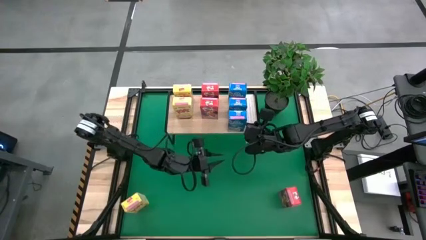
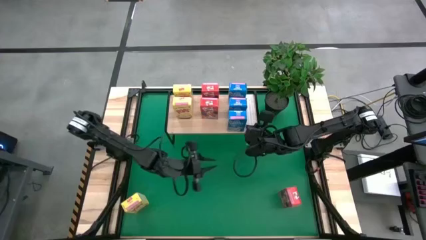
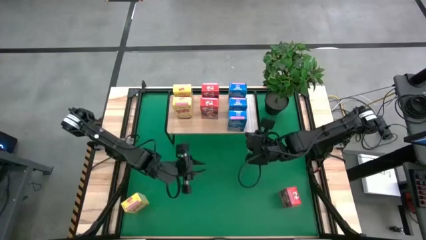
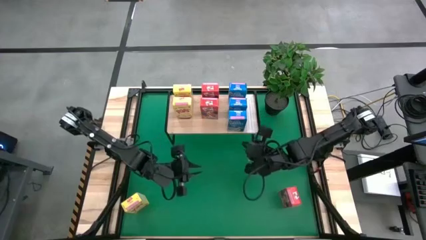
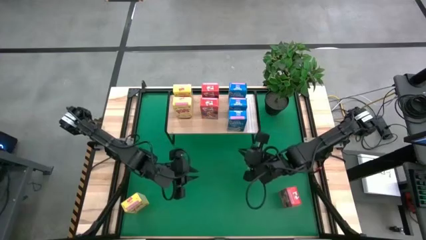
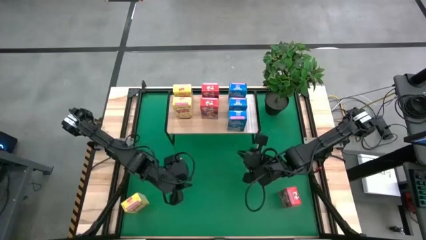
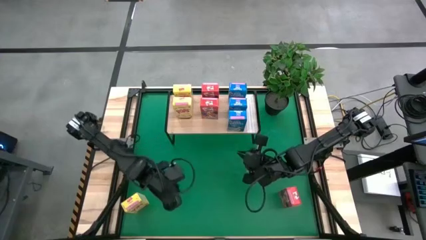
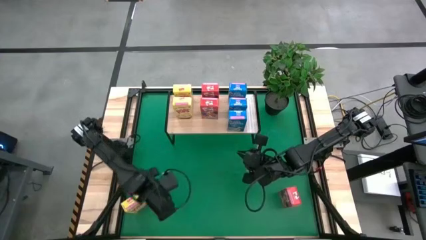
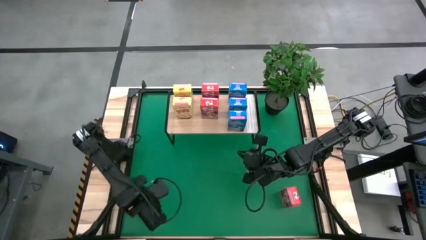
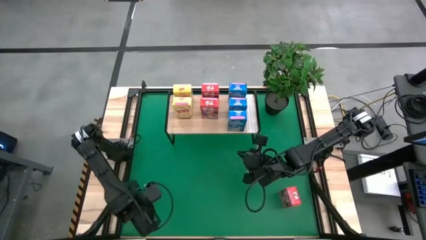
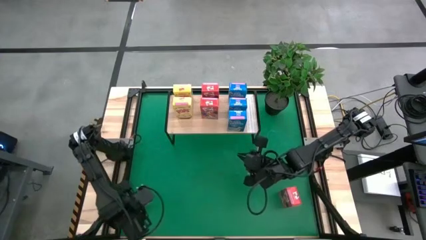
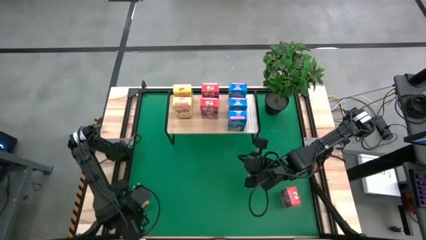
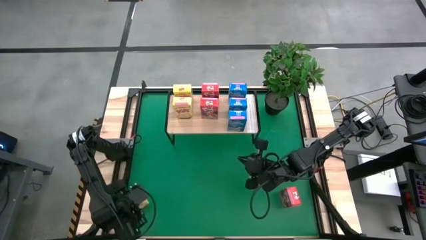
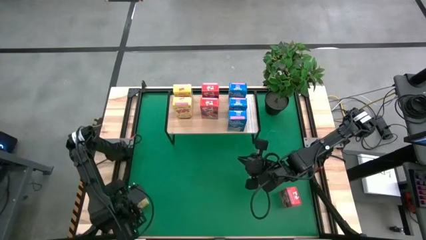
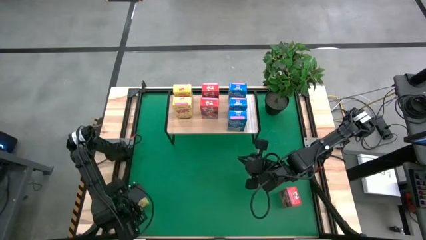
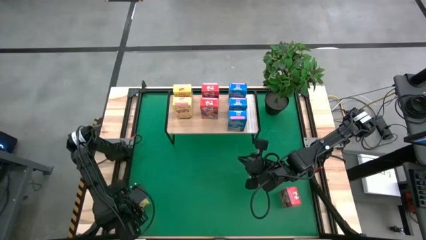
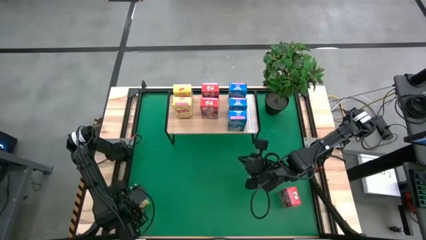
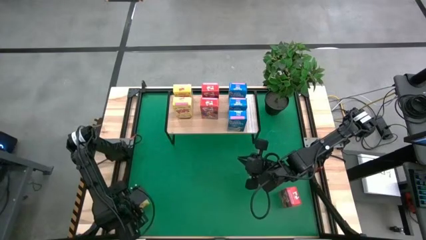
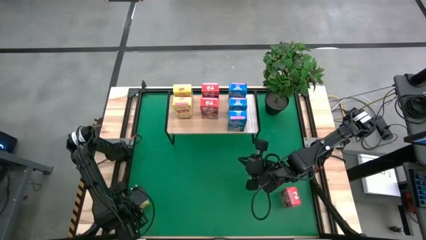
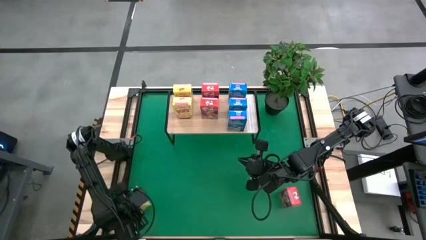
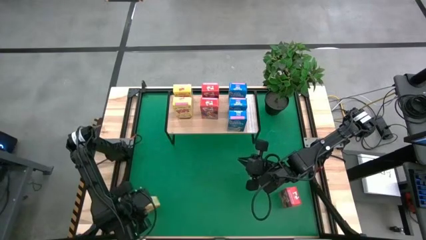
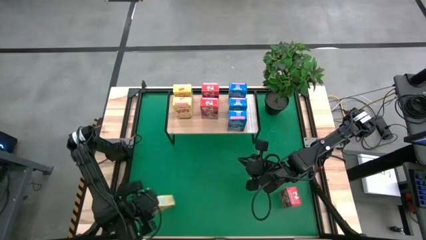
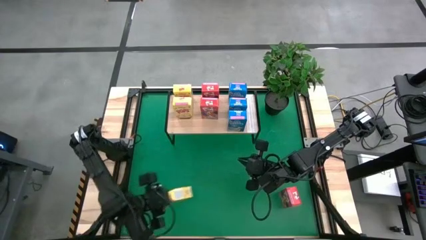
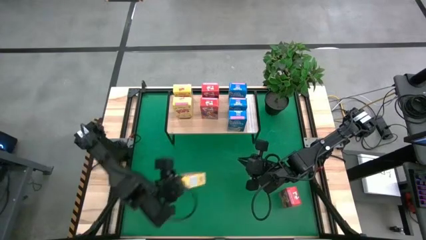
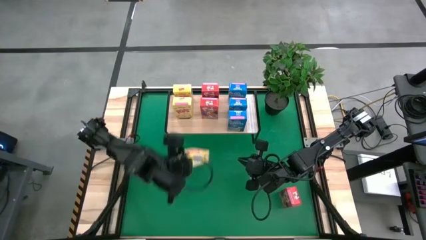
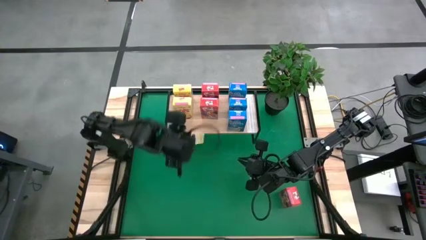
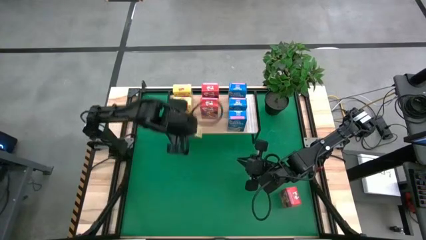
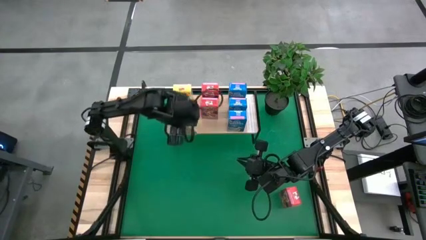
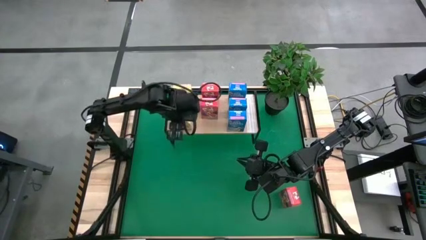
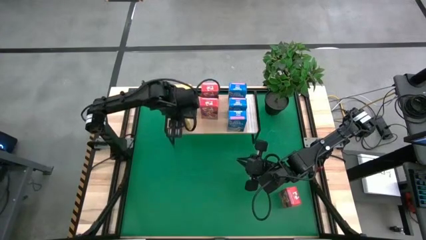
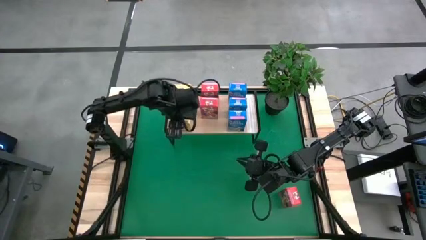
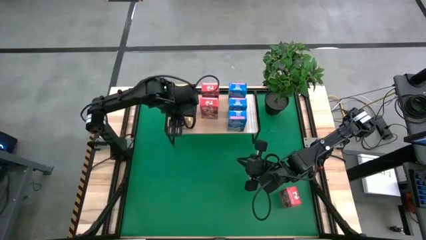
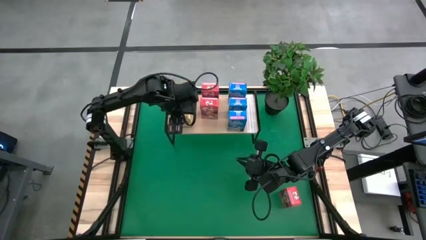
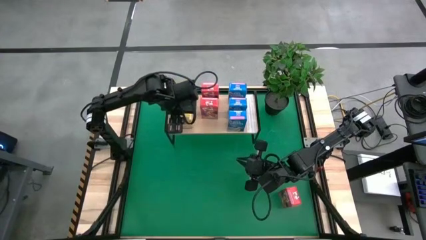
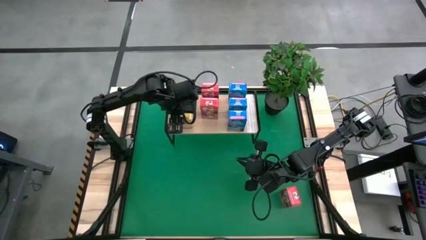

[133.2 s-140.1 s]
Task: Stack cereal on shelf
Put the yellow cereal box on the shelf aligned with the other yellow cereal boxes

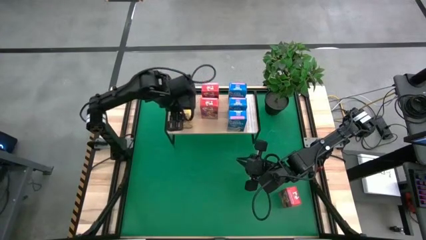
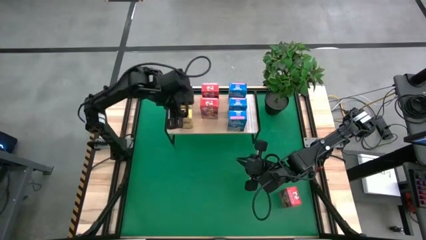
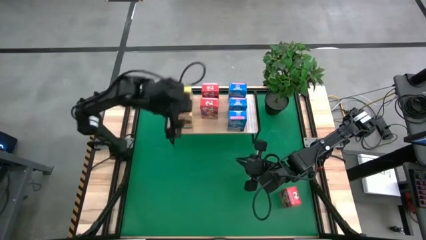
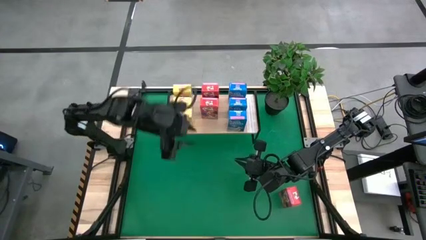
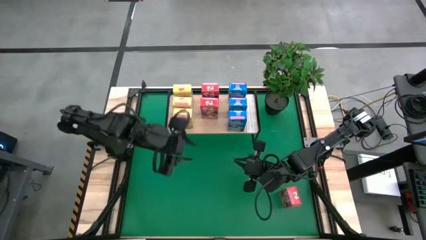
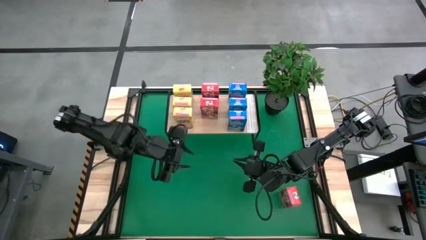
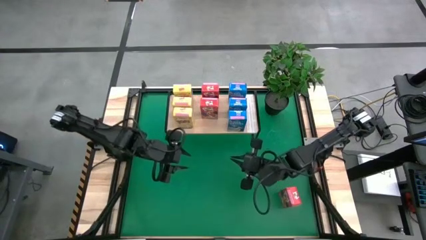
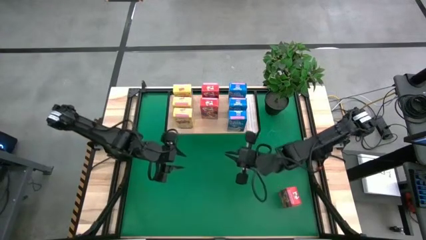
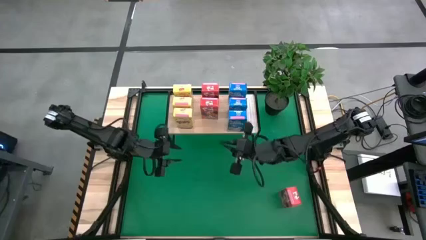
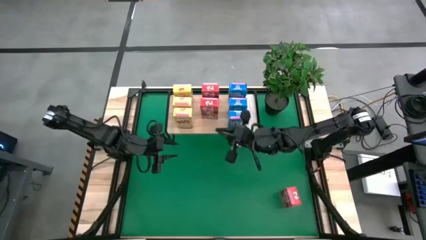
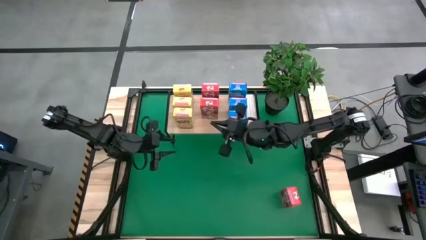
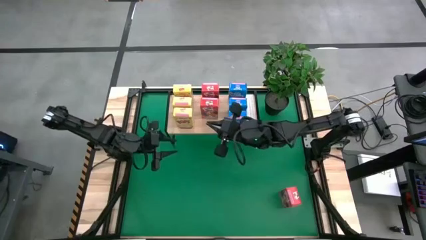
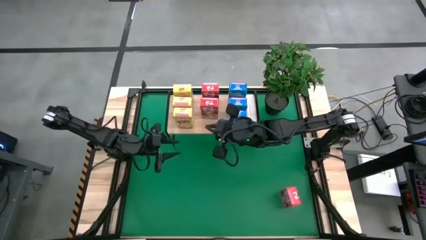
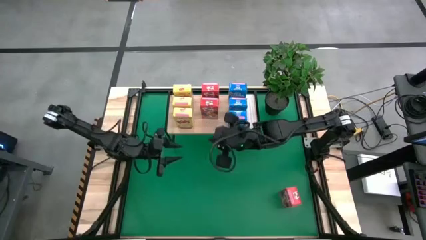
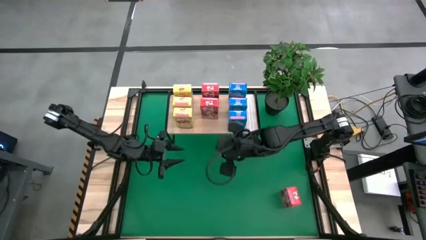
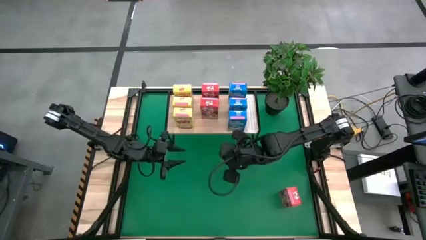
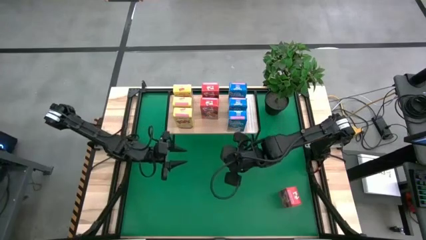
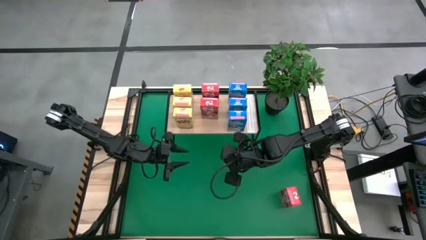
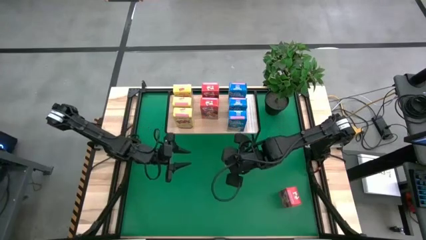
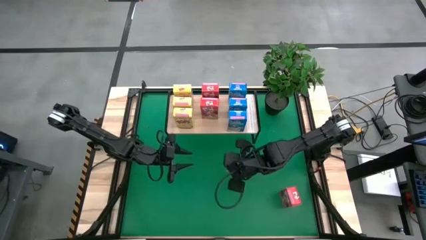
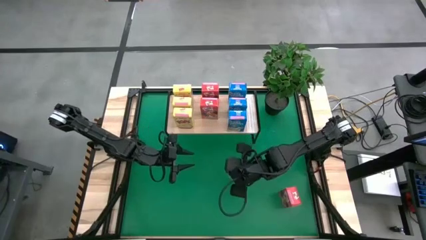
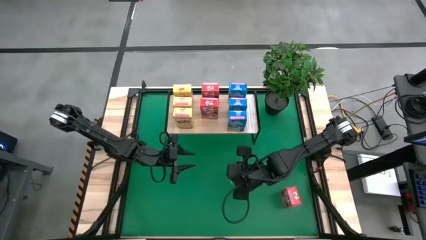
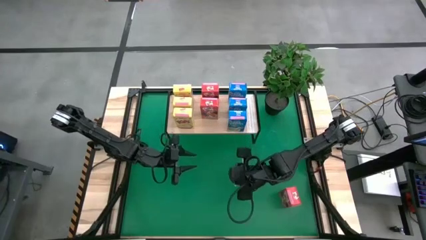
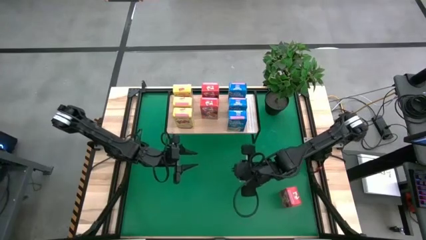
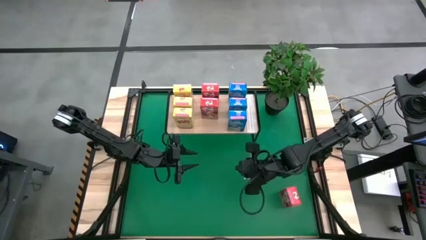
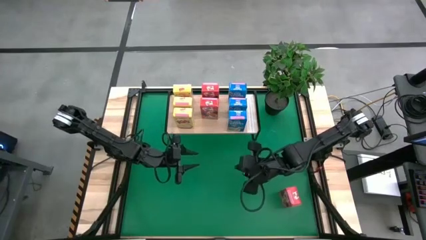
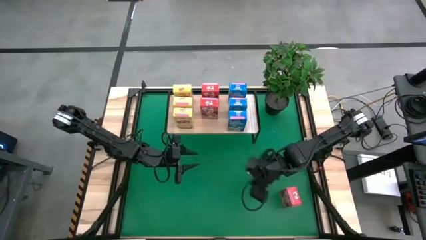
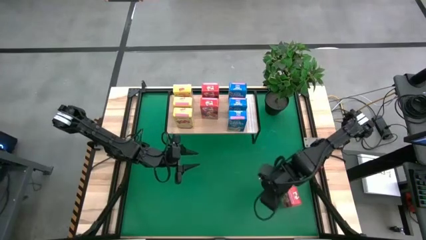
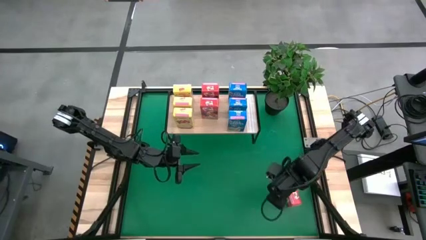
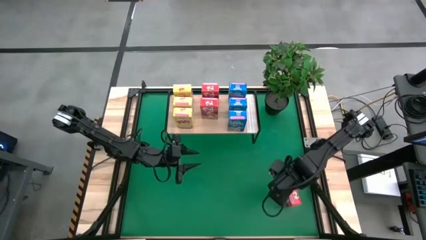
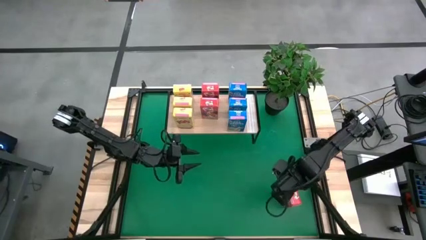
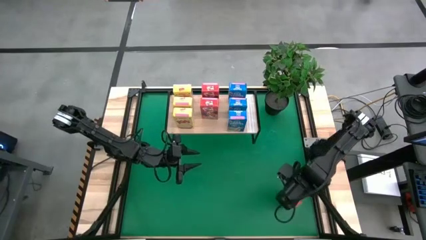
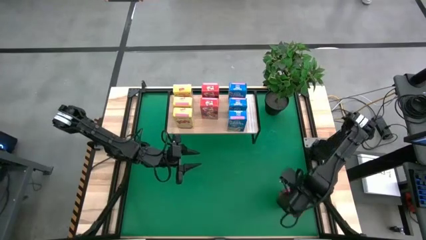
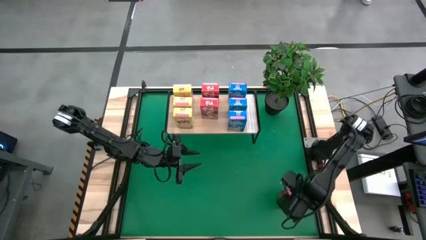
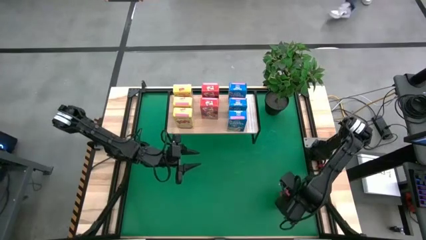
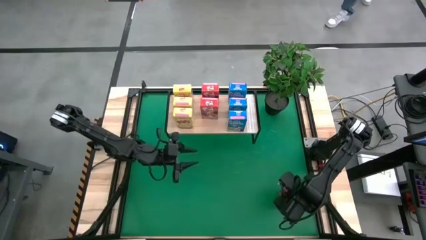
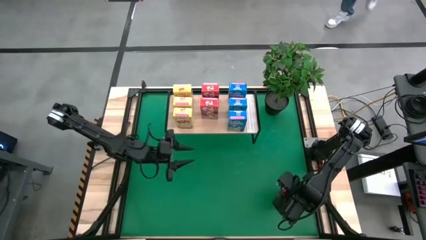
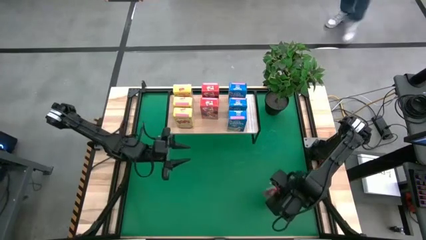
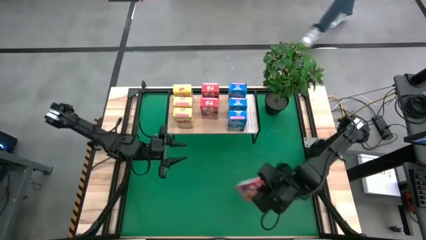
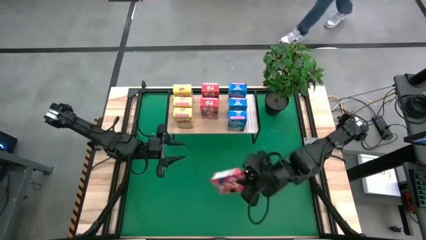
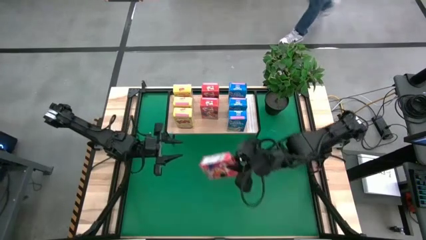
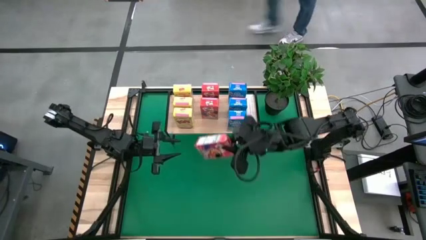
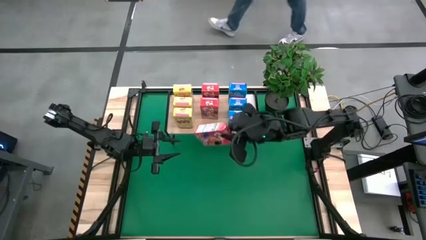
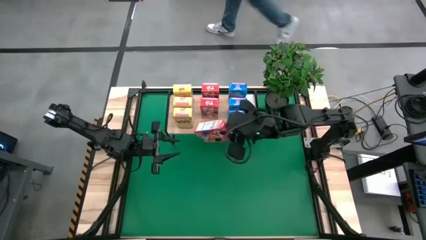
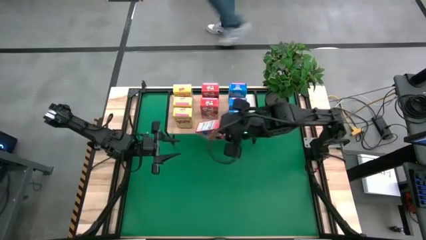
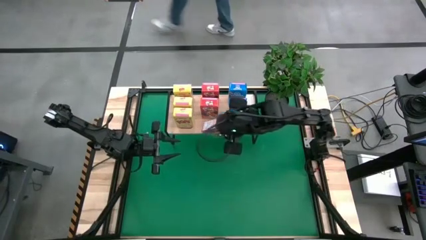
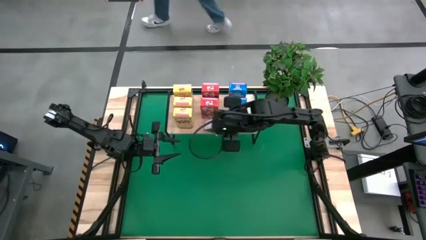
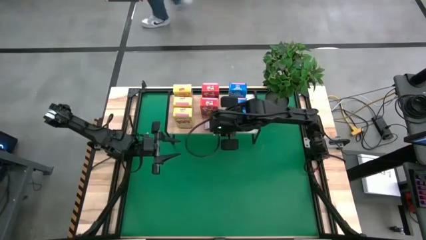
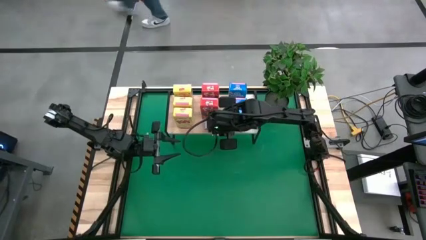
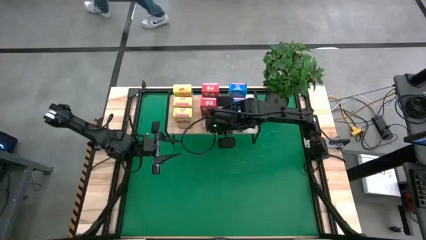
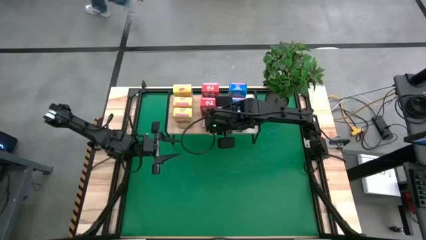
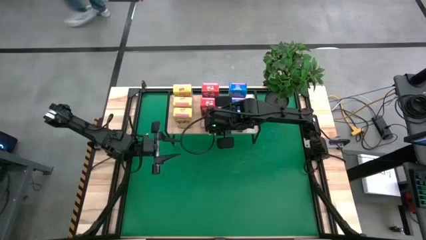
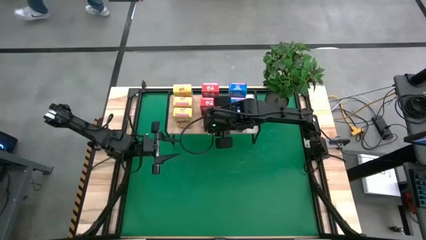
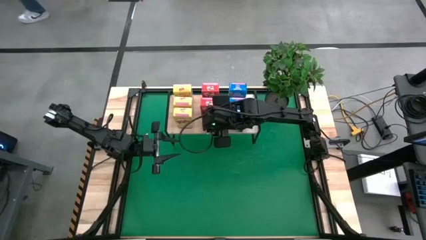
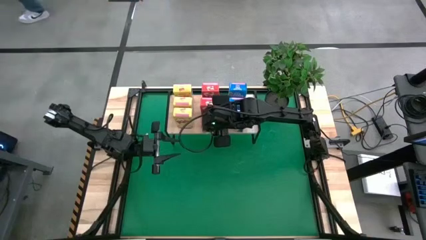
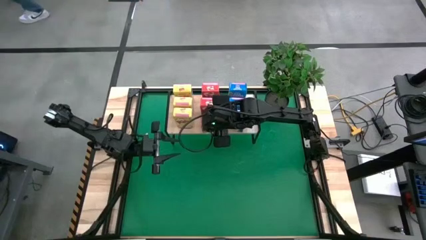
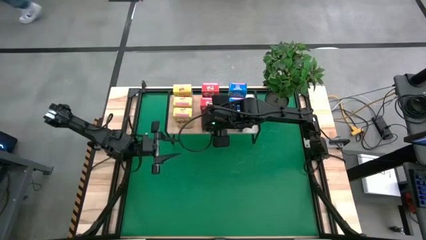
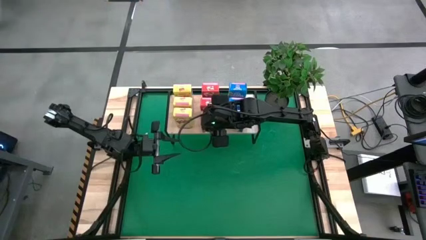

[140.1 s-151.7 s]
Put the red cereal box on the shelf aligned with the other red cereal boxes
